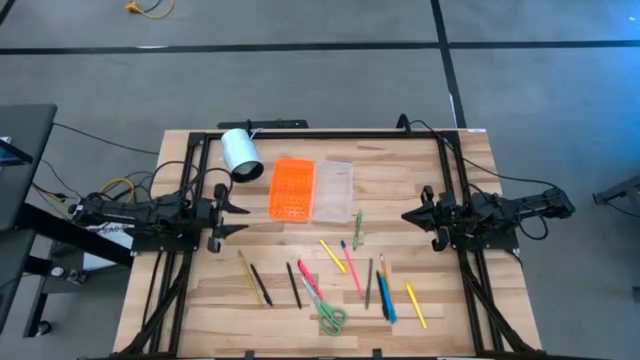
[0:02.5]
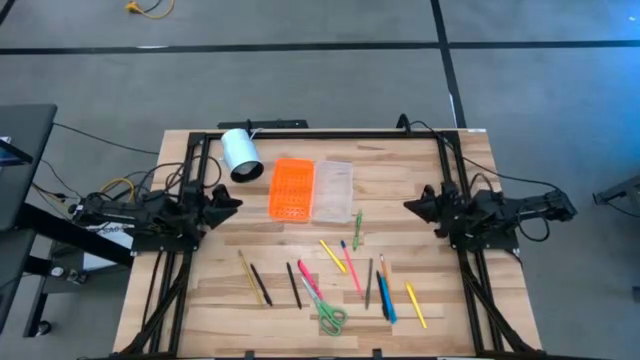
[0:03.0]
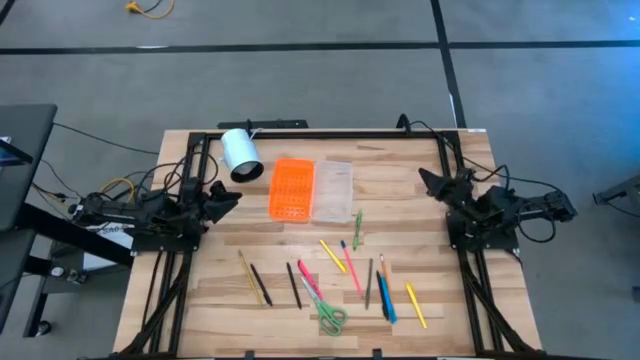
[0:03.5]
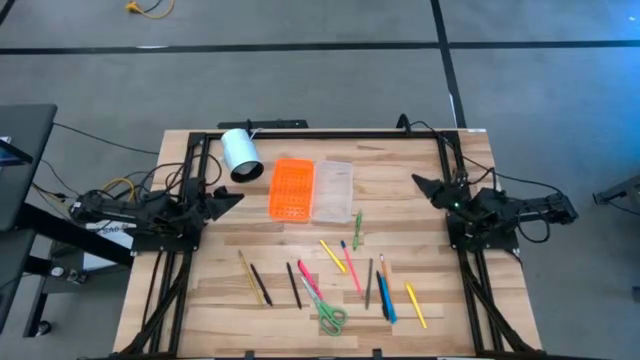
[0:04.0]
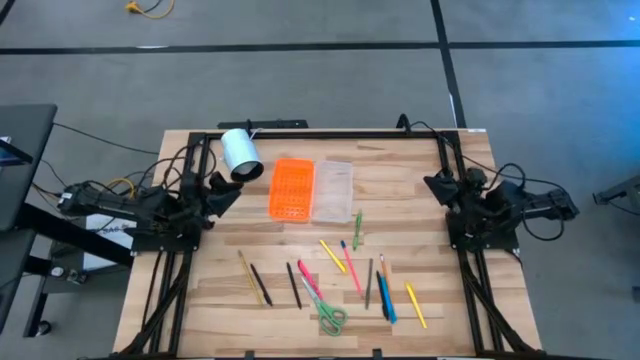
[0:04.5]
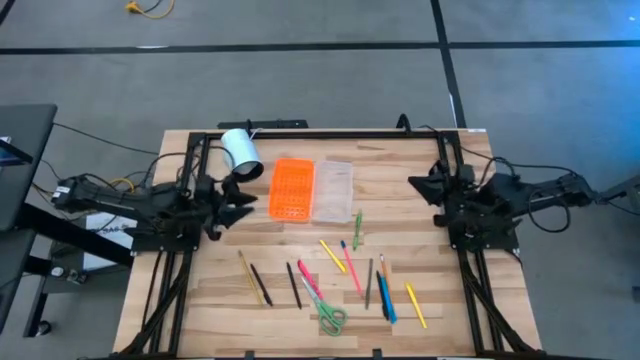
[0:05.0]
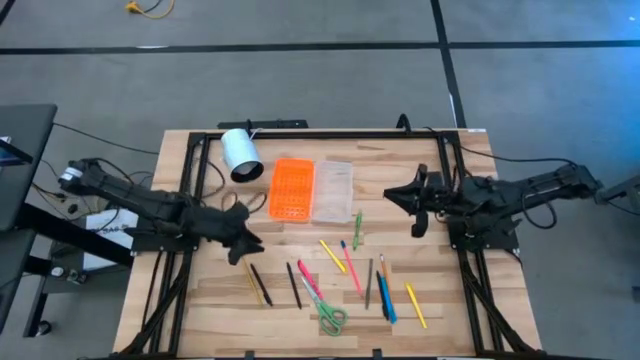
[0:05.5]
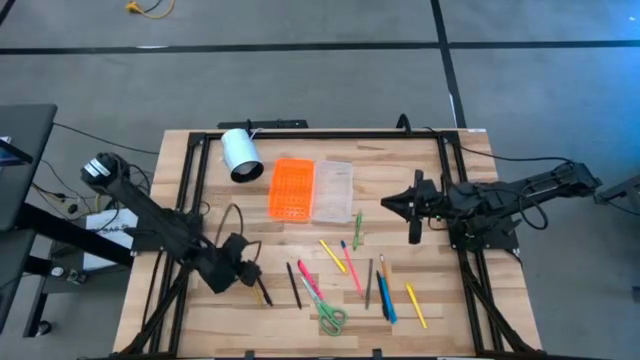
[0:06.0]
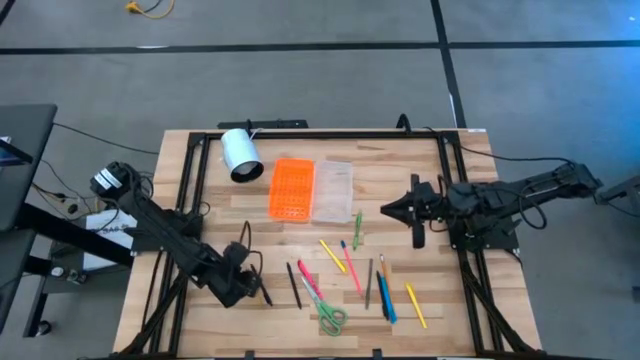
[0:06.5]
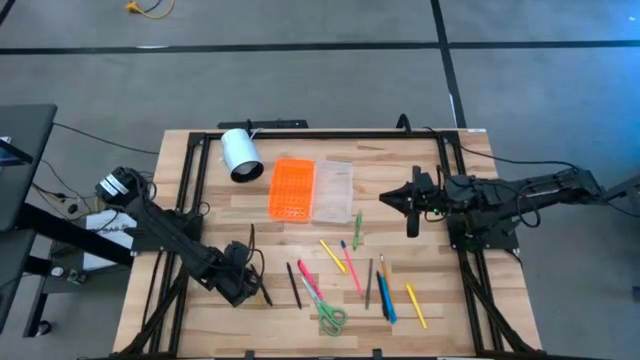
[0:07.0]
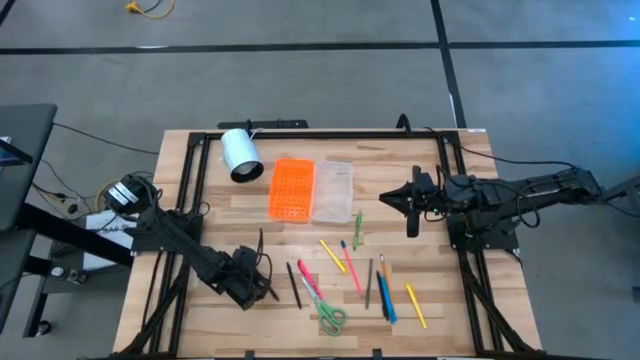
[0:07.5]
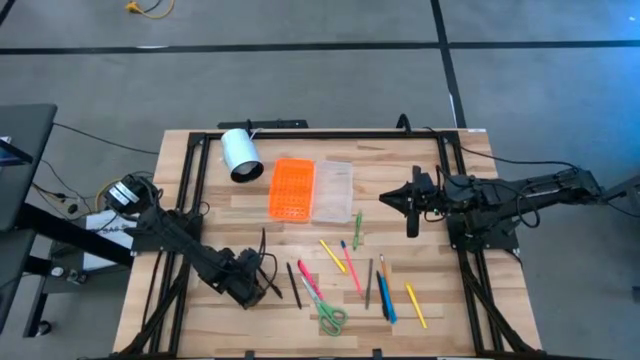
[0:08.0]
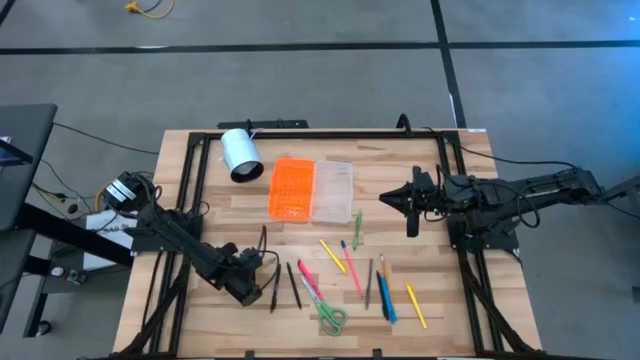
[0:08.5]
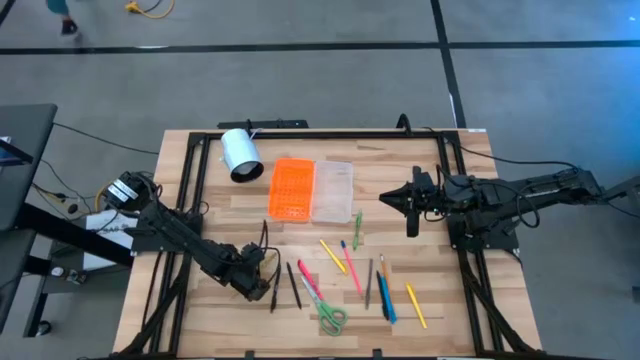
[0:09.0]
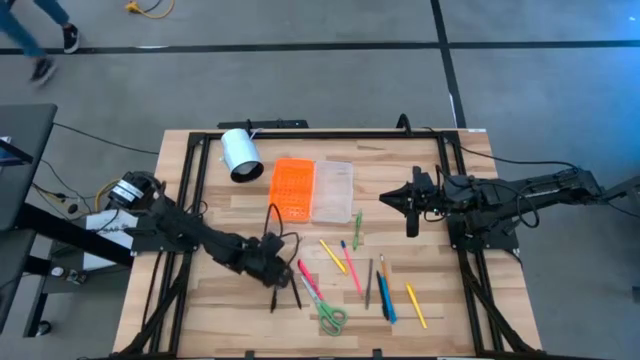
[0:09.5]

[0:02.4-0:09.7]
Task: Pick & place school supplies into a supply box
Put the yellow pencil into the orange supply box

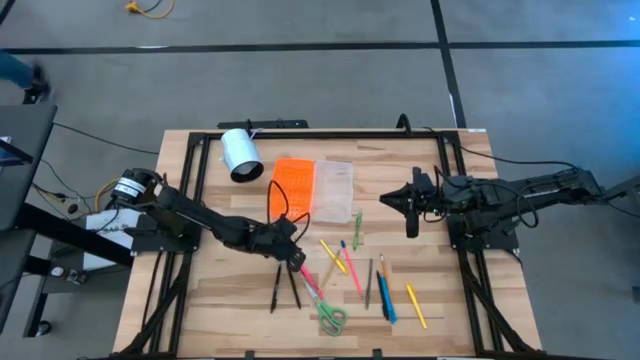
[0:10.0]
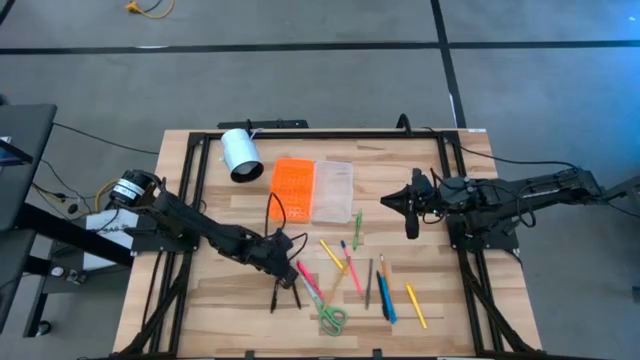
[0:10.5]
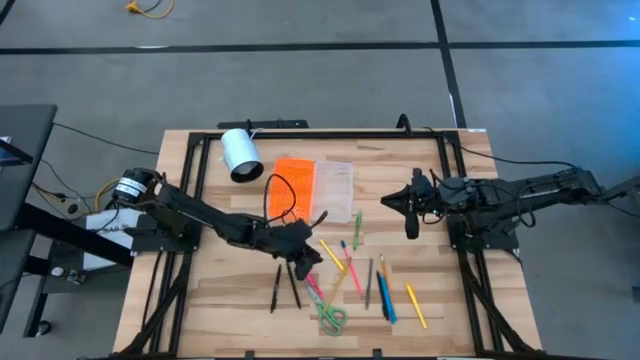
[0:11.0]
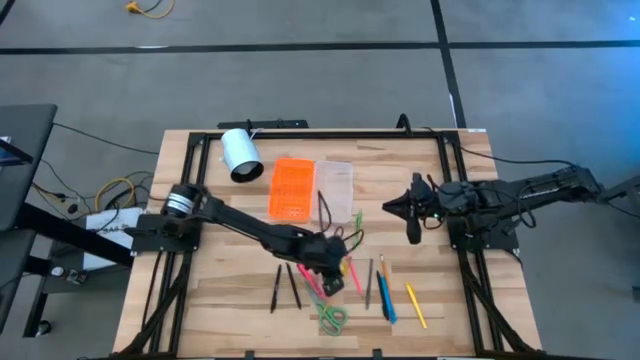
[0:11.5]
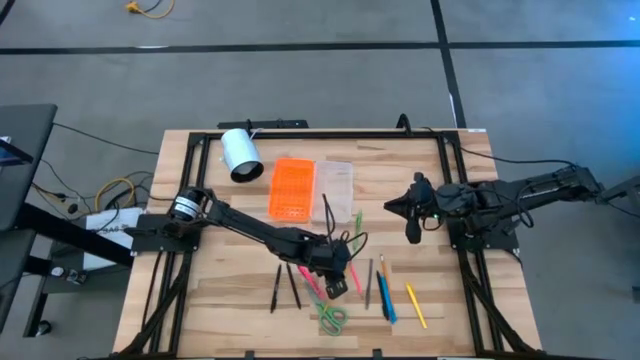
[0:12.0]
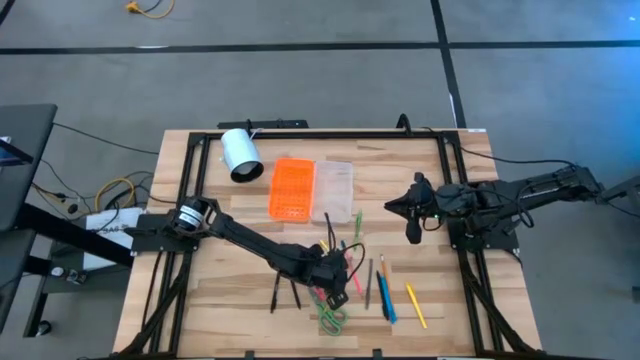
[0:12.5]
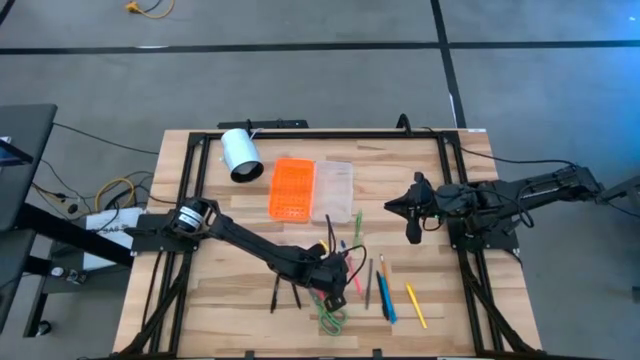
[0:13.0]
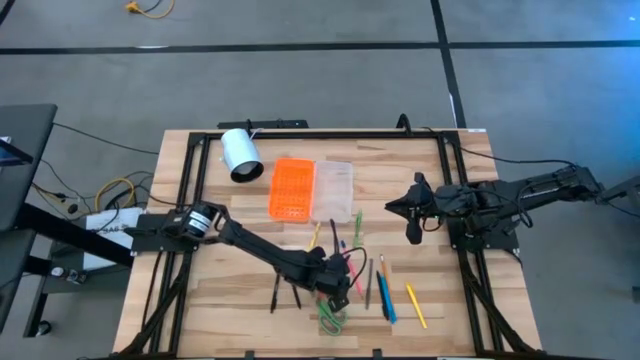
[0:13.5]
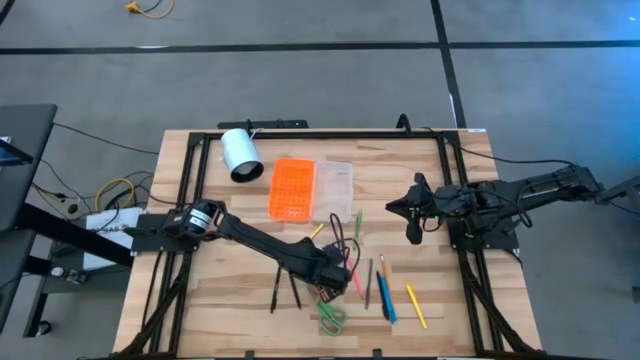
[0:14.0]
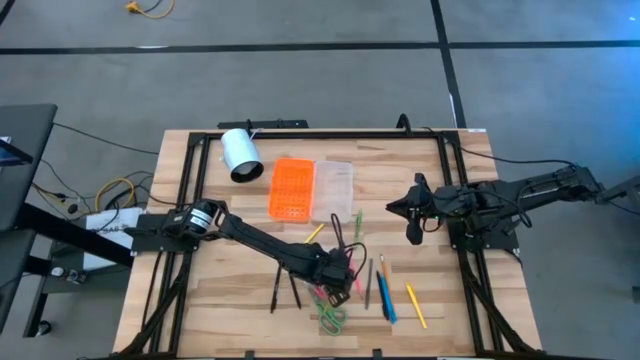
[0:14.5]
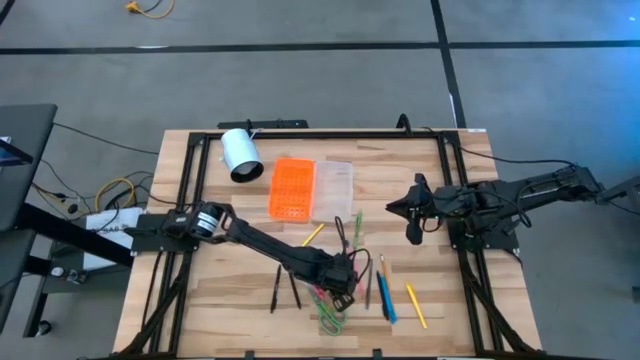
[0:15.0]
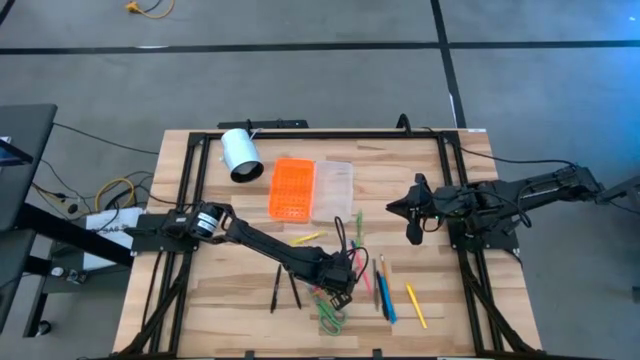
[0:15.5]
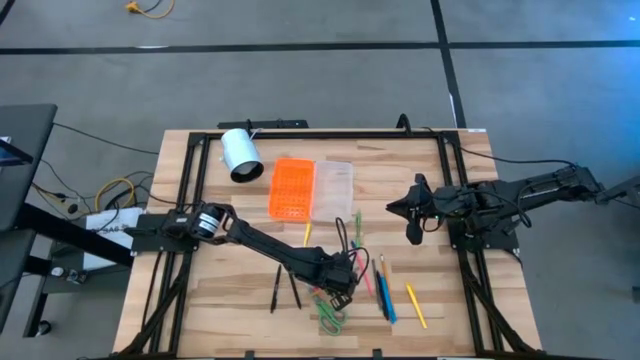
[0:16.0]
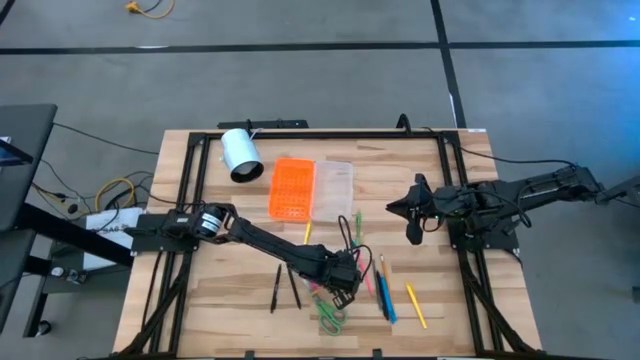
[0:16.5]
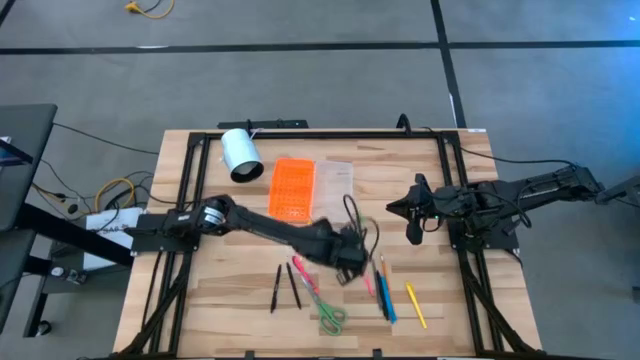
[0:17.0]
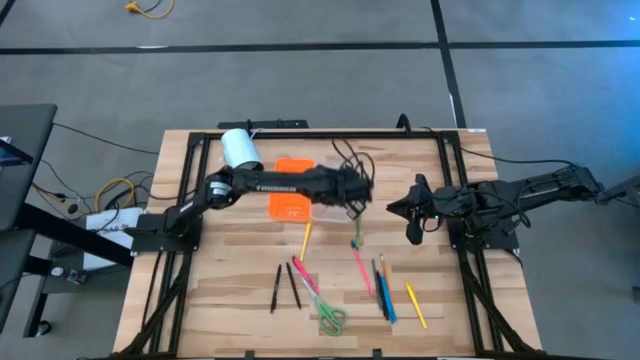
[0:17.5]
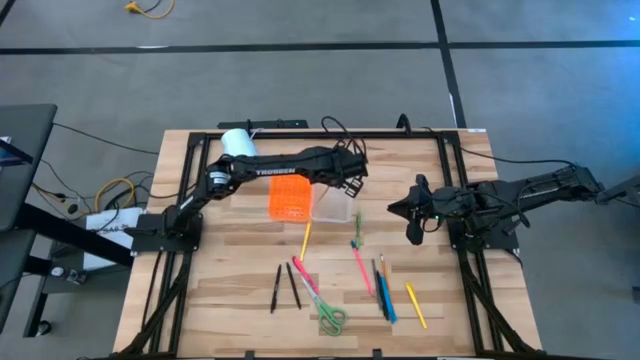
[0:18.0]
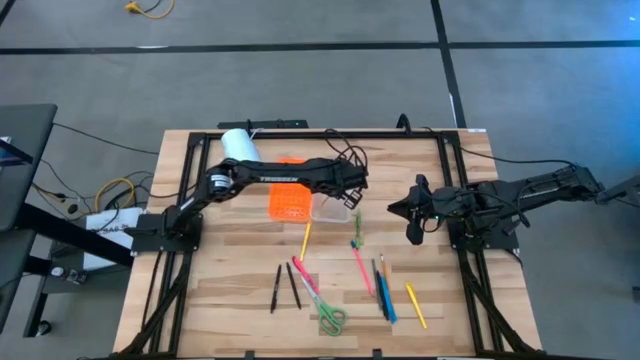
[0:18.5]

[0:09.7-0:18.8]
Put the yellow pencil into the orange supply box

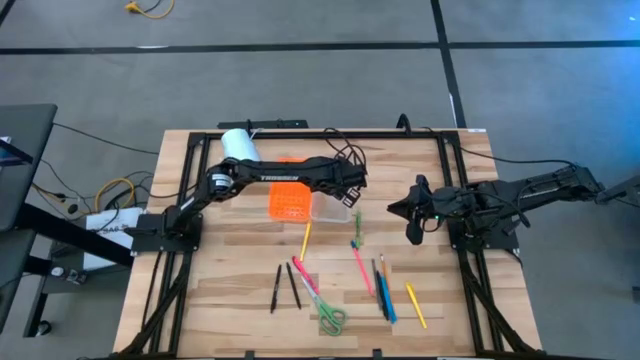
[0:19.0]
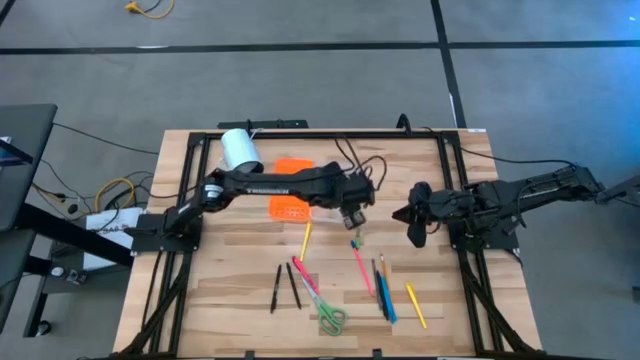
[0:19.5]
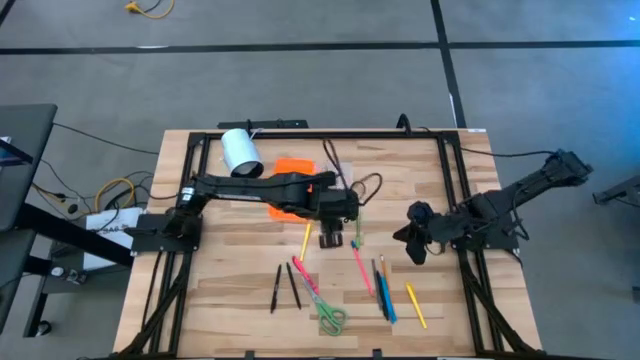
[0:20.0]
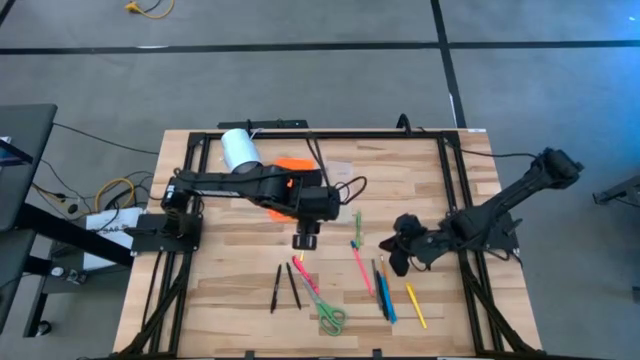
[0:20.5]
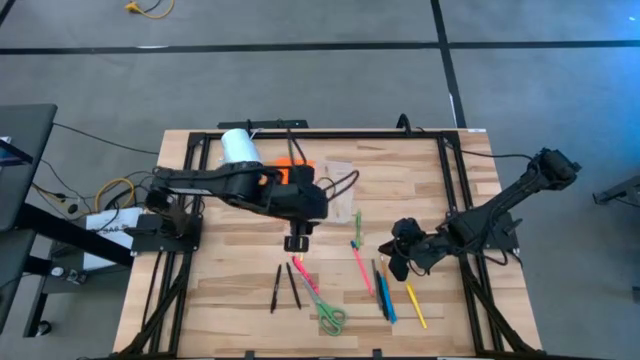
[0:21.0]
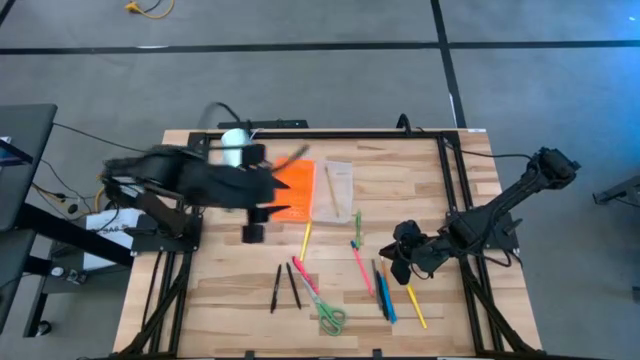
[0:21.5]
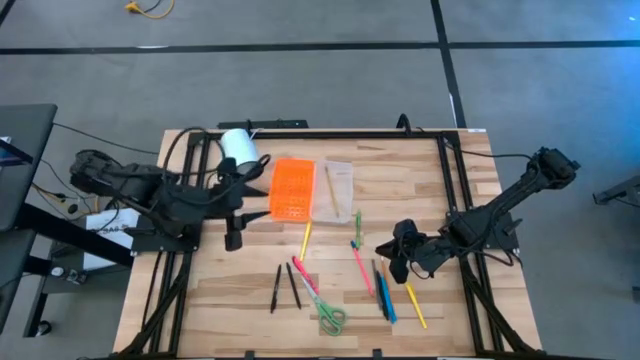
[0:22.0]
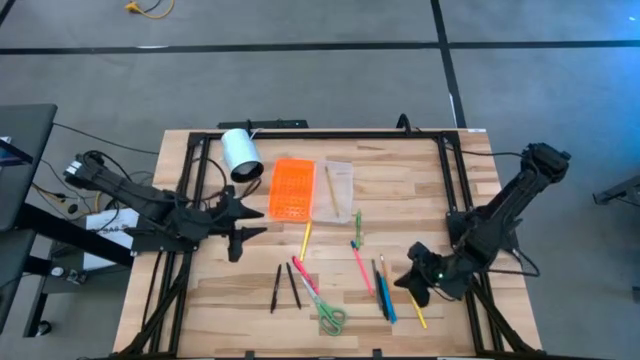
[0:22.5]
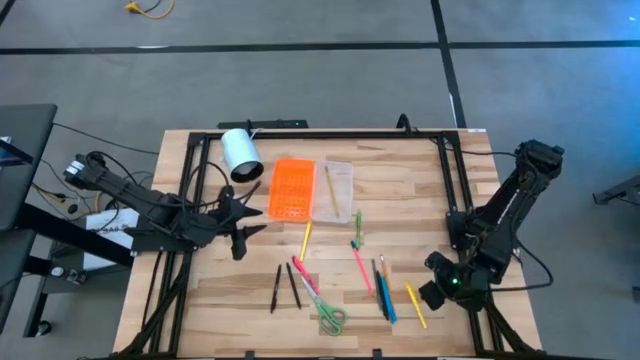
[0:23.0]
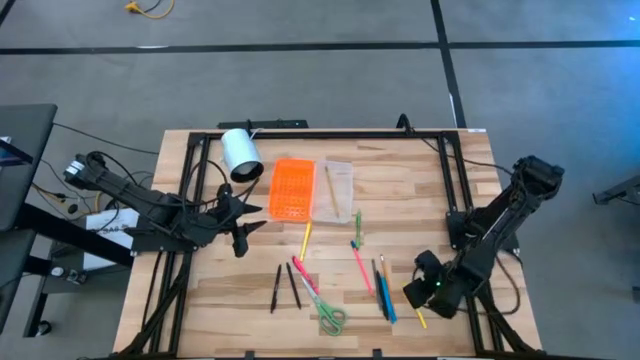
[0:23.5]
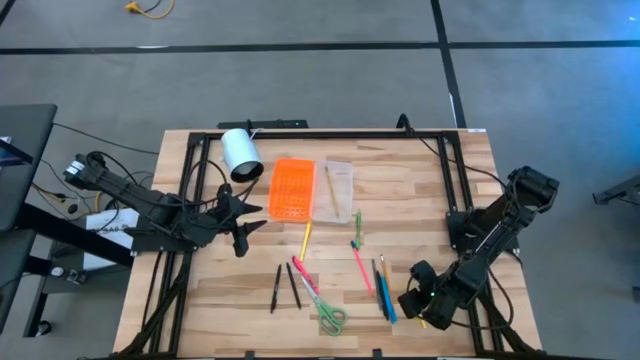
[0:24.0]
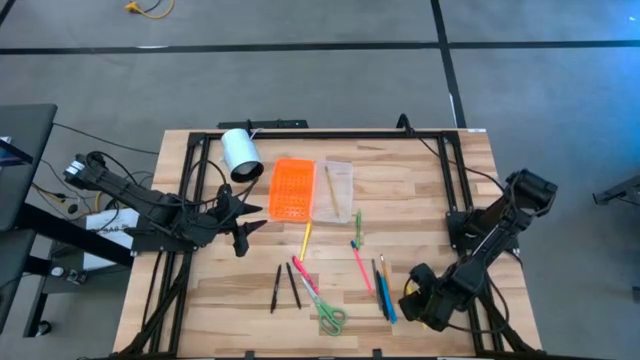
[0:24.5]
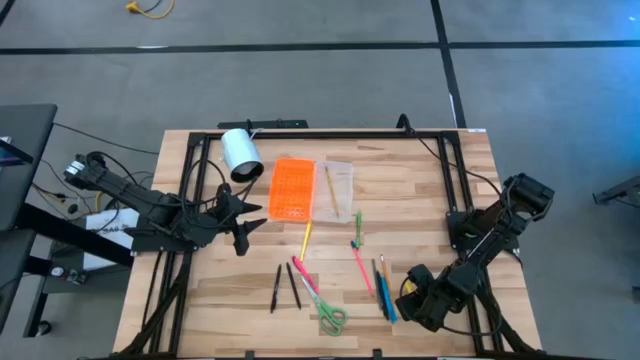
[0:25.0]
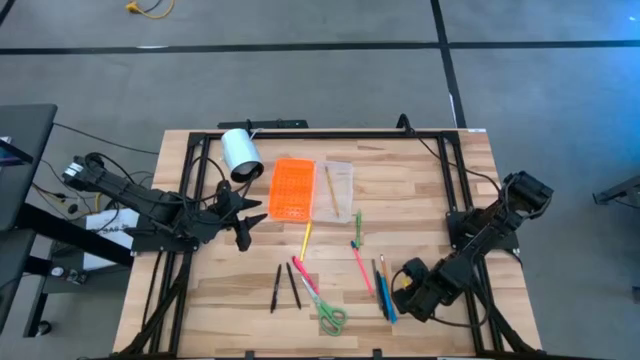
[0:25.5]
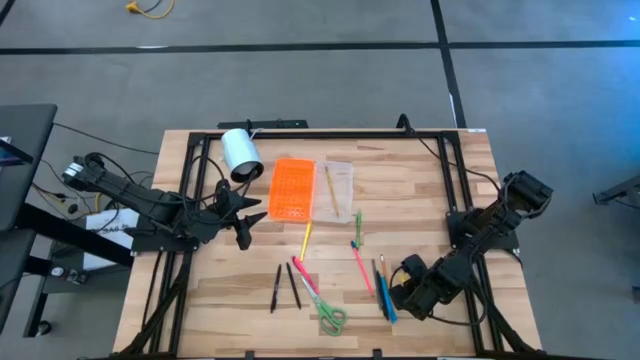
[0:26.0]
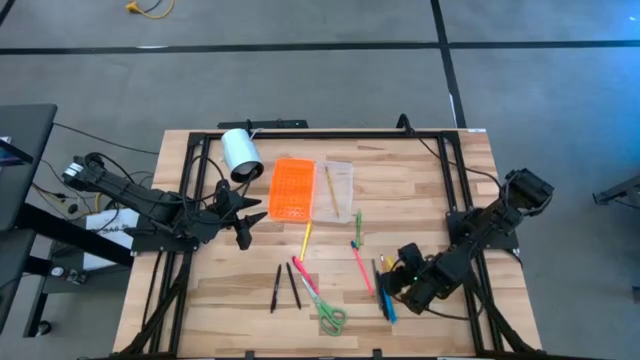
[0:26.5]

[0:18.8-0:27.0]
Put the right yellow pen into the orange supply box
